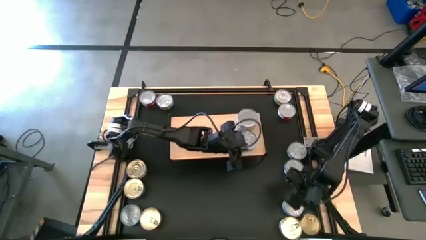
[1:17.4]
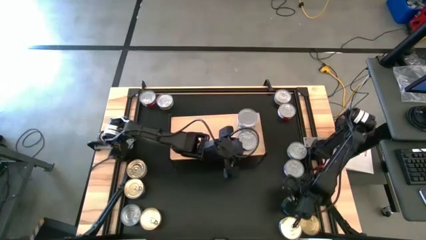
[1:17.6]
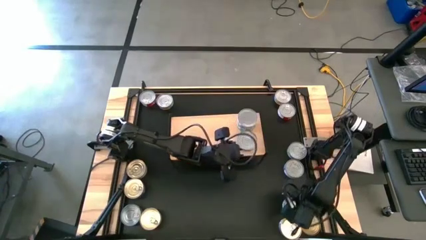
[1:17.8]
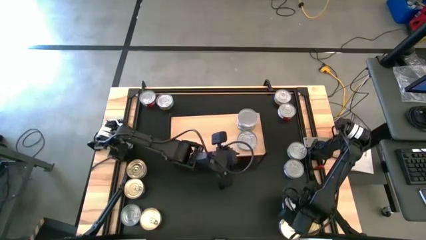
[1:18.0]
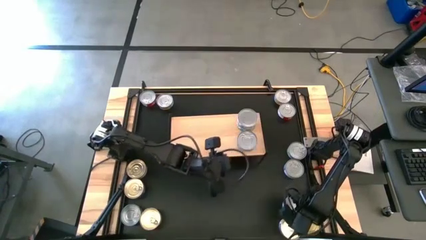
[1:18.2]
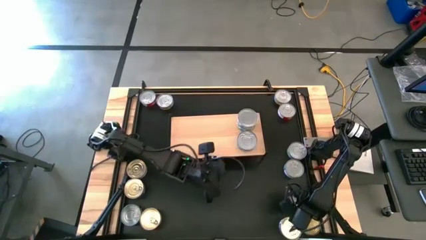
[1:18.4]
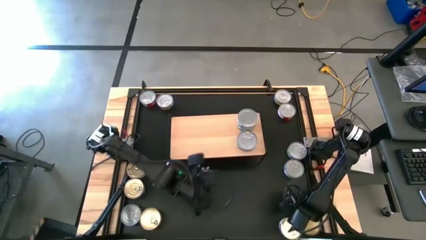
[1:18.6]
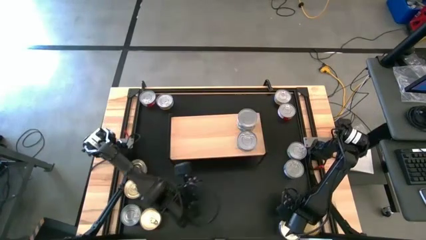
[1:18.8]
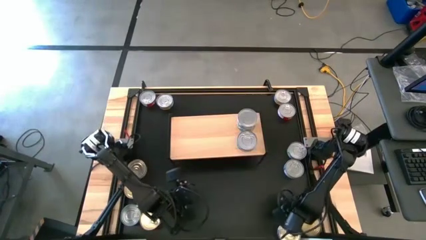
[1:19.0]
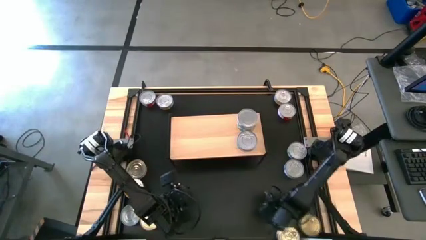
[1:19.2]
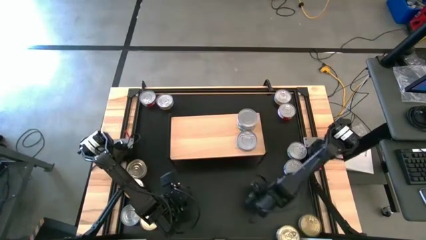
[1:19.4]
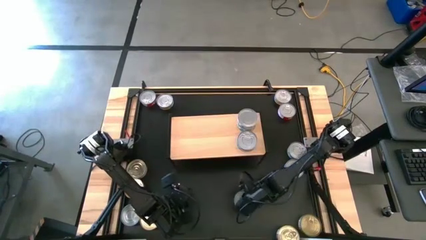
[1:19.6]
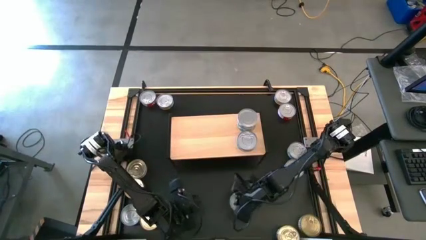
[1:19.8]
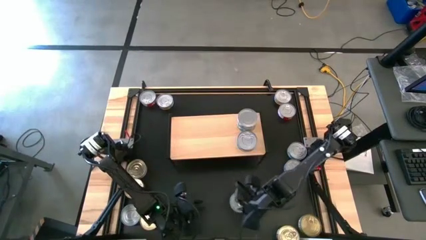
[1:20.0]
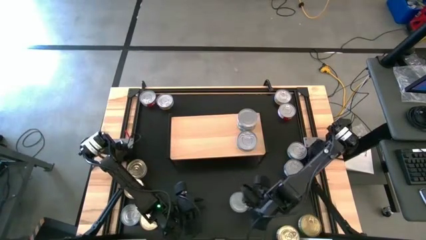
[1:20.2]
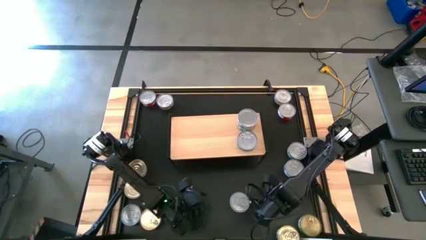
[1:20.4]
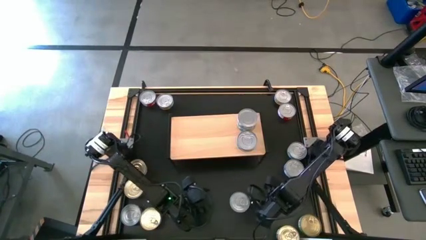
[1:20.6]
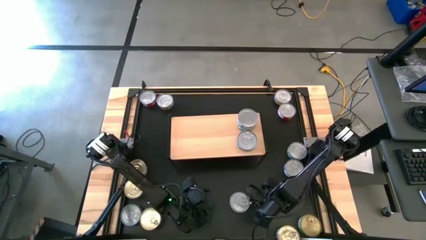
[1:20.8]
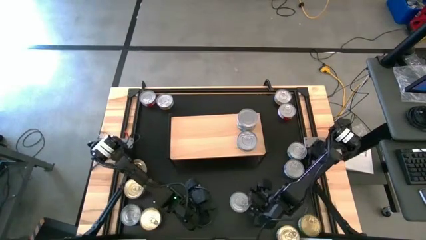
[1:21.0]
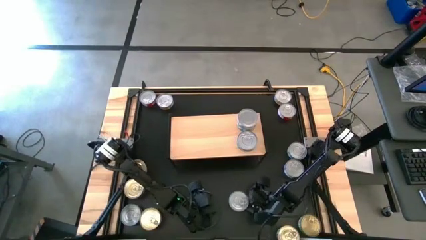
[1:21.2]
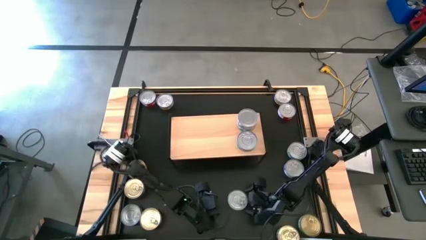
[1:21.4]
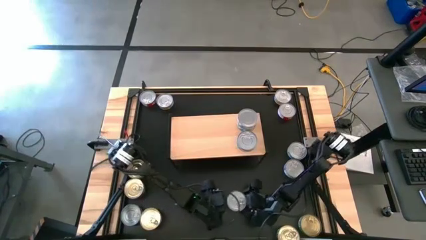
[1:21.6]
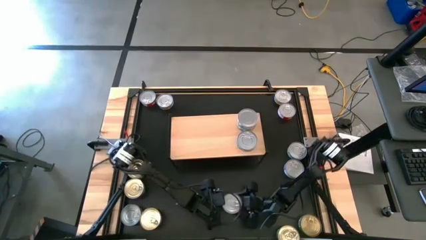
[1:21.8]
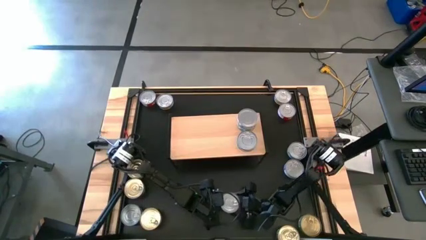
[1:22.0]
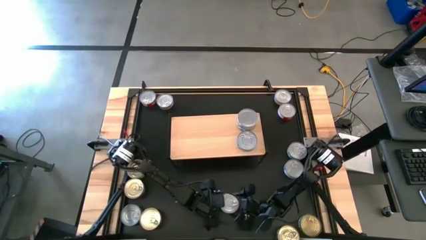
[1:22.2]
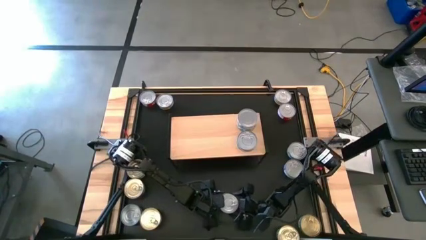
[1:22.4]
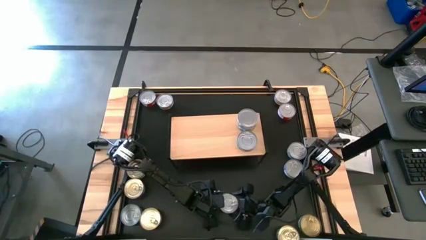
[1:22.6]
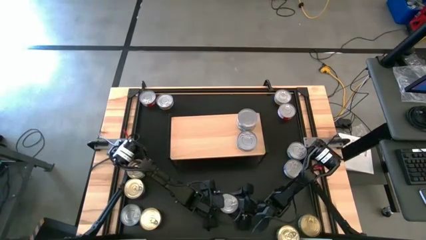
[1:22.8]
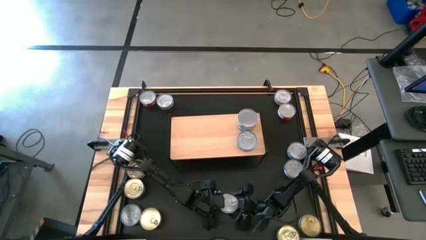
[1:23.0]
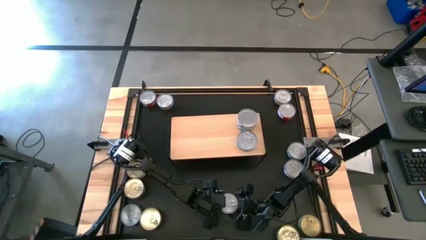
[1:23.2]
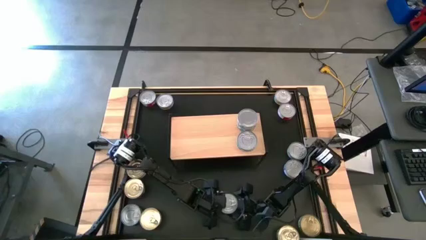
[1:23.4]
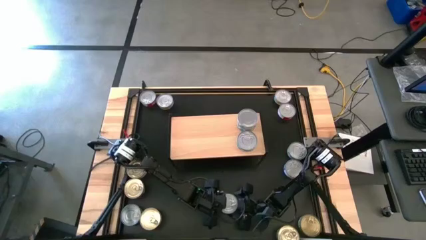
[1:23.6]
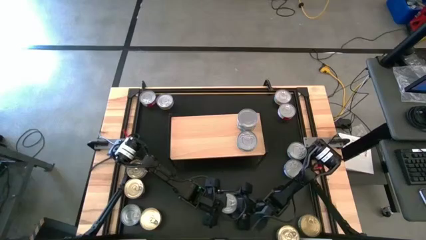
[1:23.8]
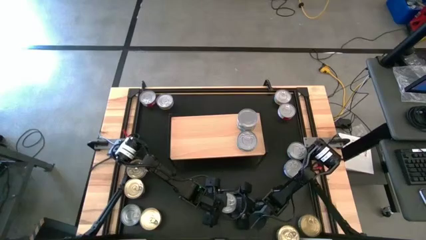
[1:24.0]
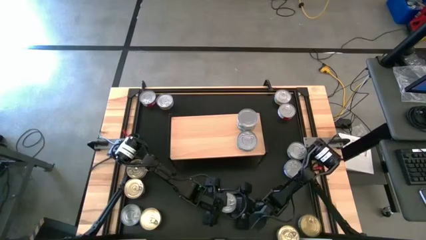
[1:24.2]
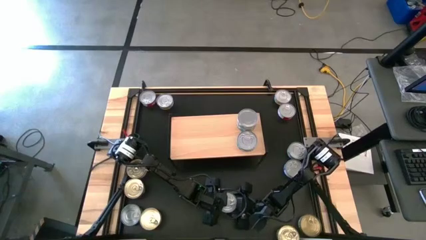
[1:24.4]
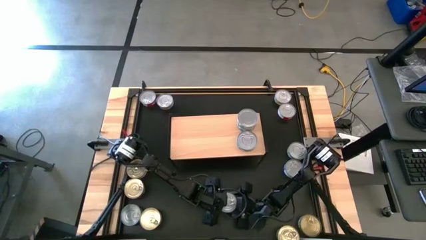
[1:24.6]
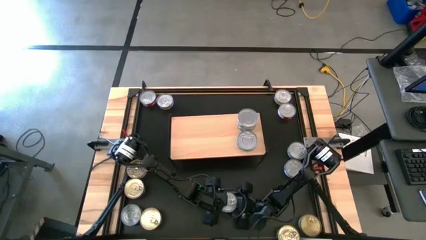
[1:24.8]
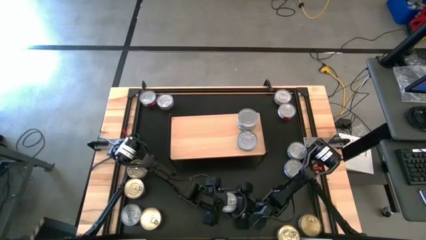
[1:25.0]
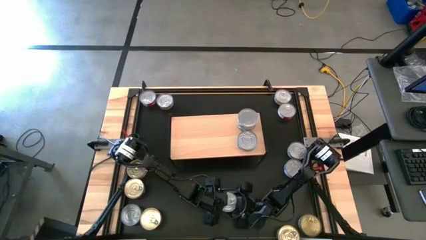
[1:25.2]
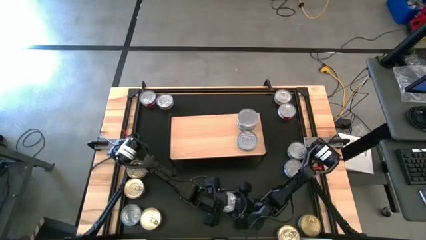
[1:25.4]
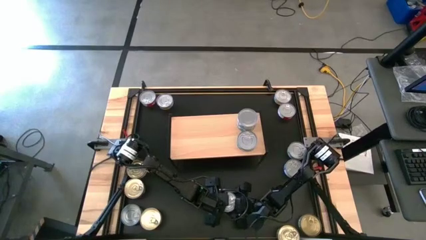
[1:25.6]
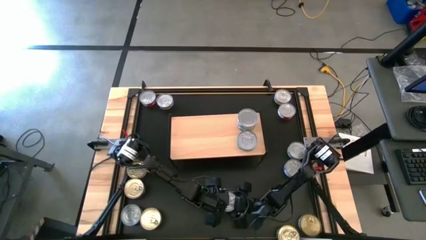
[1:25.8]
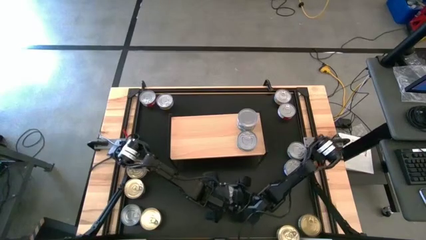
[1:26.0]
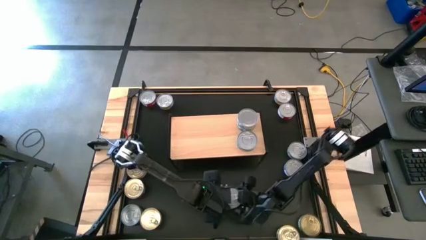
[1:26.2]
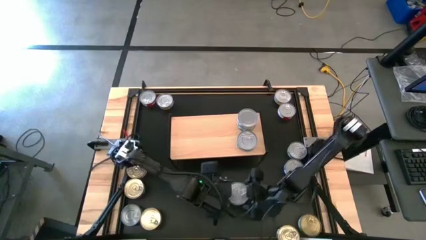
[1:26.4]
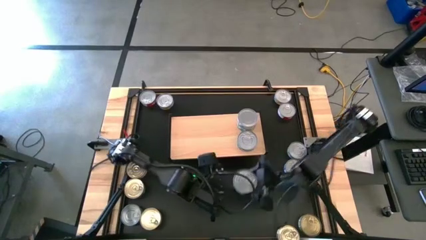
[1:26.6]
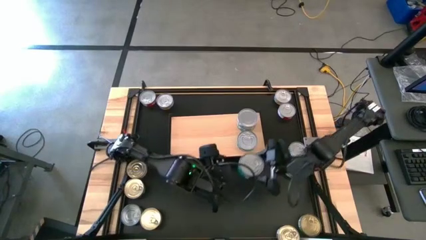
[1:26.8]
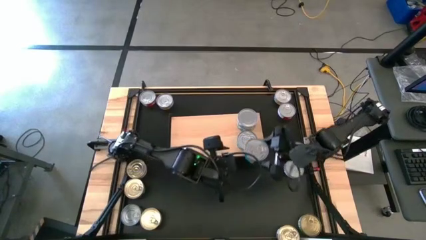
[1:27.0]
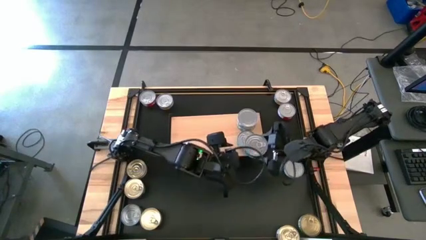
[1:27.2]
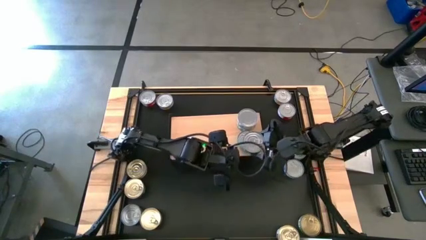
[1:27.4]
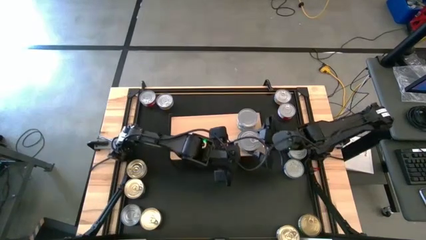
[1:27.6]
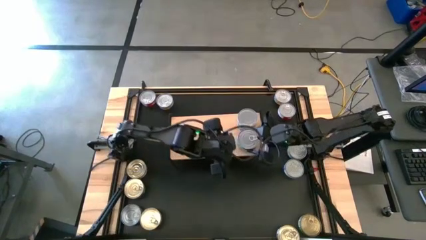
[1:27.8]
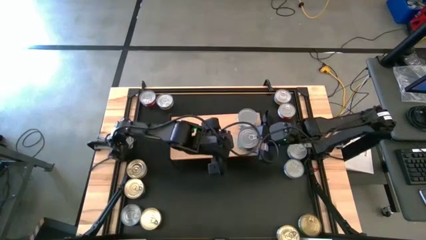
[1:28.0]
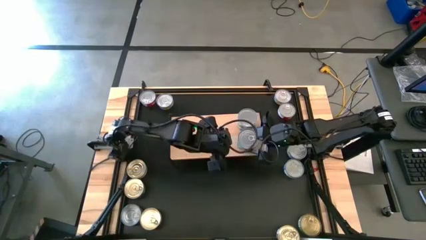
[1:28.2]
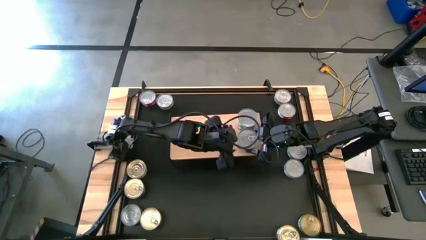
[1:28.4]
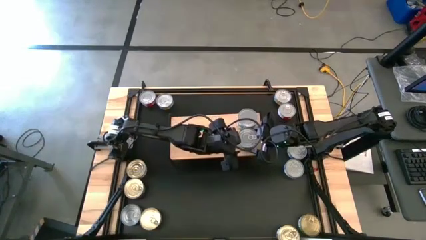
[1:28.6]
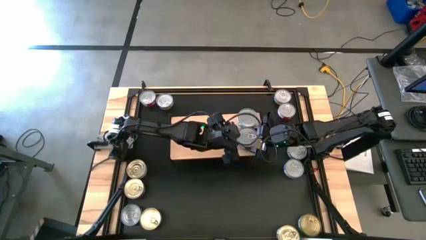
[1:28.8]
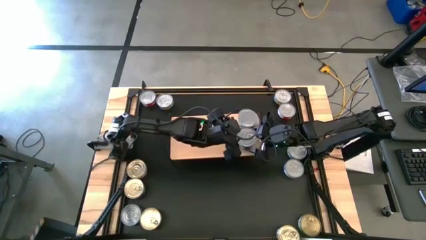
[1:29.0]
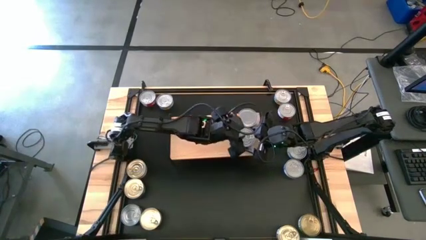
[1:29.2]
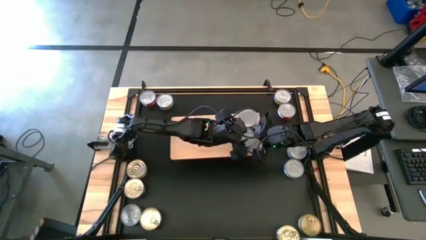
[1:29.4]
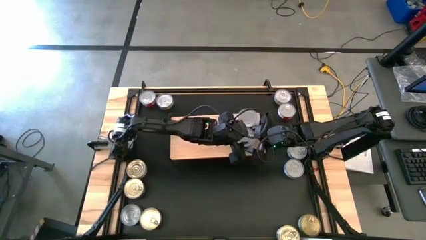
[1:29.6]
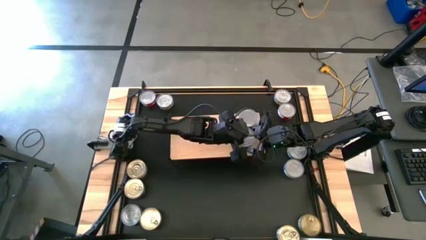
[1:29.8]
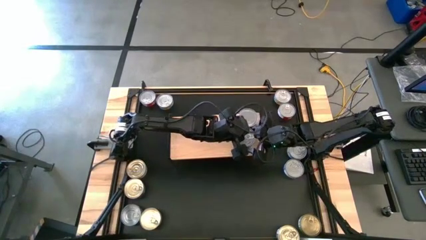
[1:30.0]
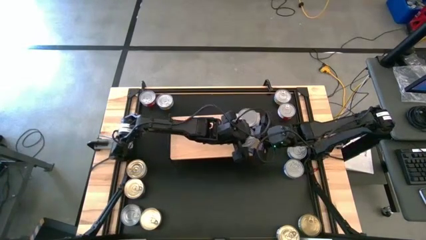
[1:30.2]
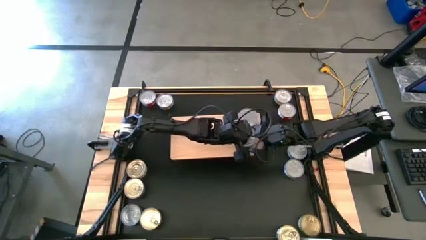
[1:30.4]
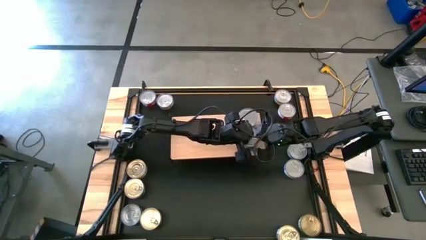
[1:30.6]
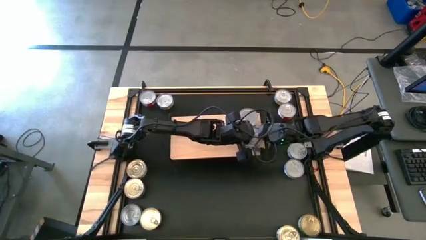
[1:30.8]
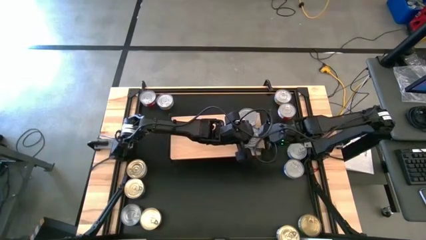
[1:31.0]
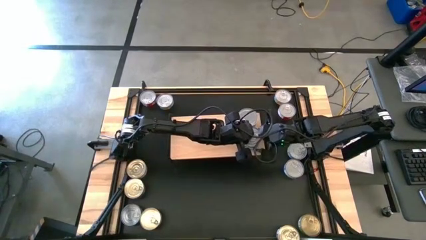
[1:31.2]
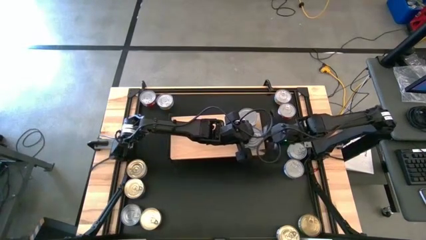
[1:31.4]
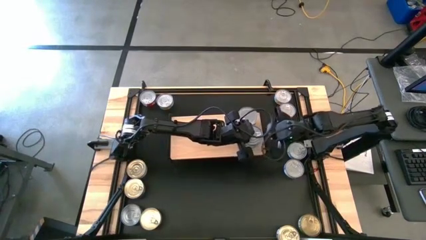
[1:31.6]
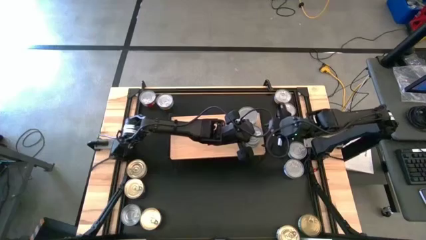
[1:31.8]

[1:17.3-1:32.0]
Task: Stack canned seafood by type on shelf
Stack the green blue tuna can on top of the green blue tuna can on the shelf

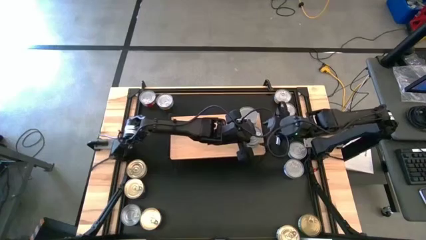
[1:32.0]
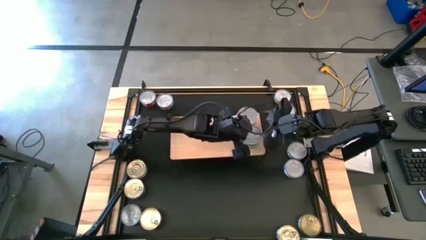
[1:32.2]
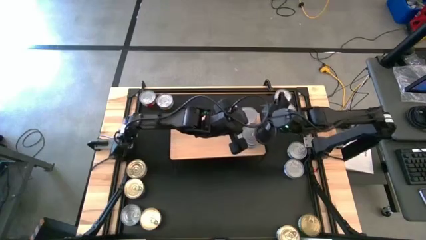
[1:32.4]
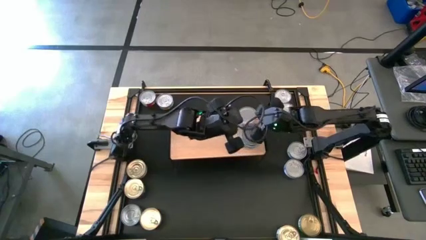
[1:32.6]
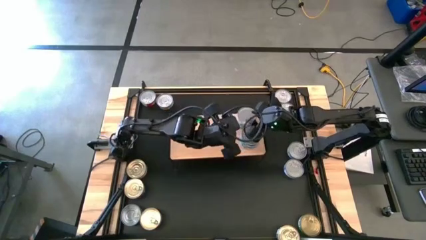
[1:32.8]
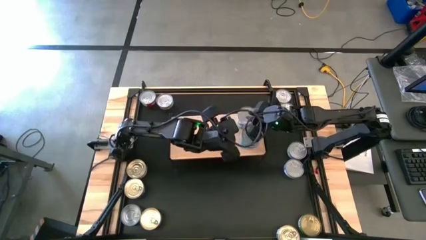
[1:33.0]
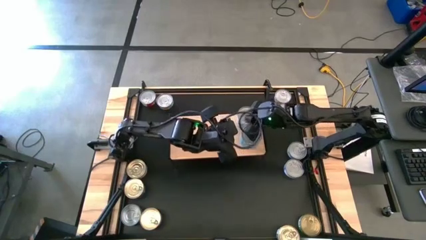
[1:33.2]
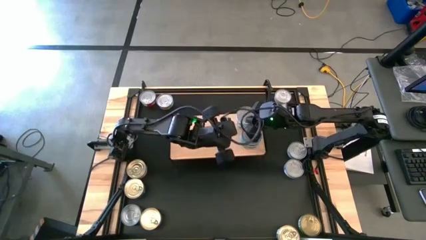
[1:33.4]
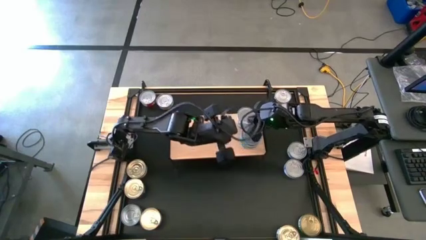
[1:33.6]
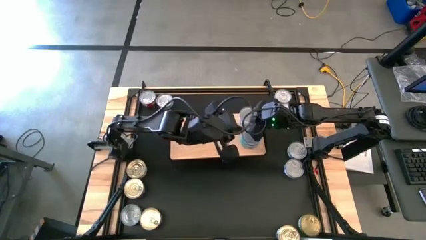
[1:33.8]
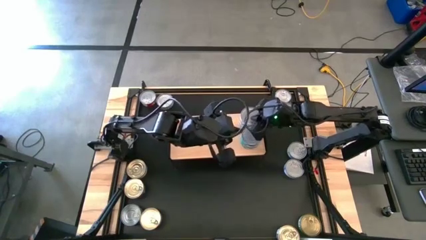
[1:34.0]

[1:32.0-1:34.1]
Adjust the stacked green white tuna cans on the shelf
